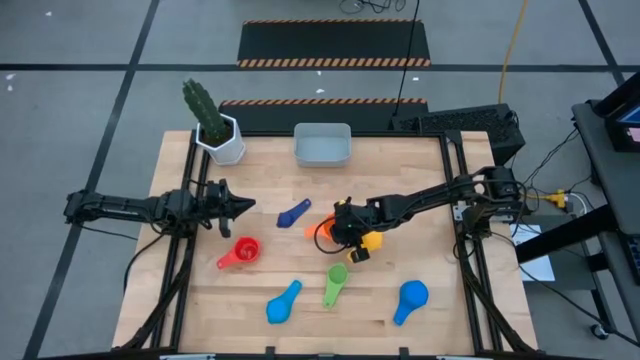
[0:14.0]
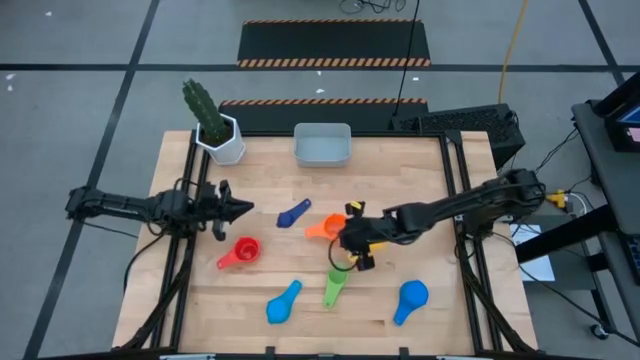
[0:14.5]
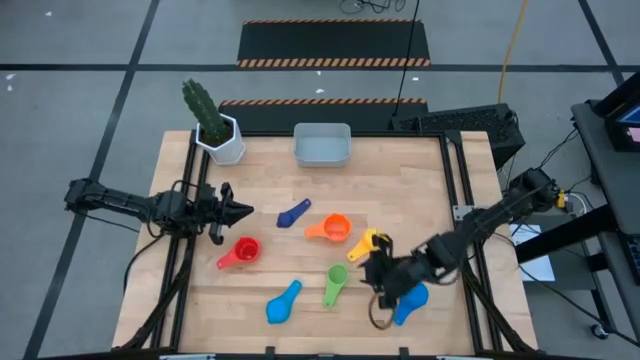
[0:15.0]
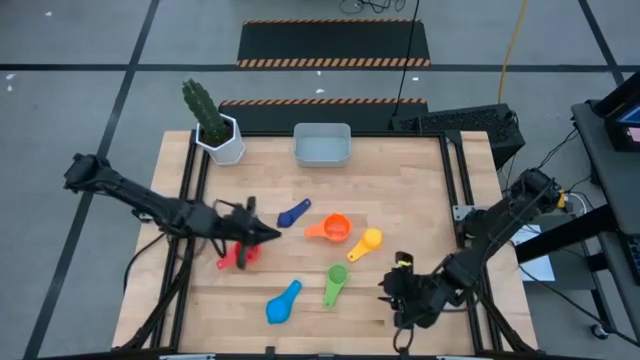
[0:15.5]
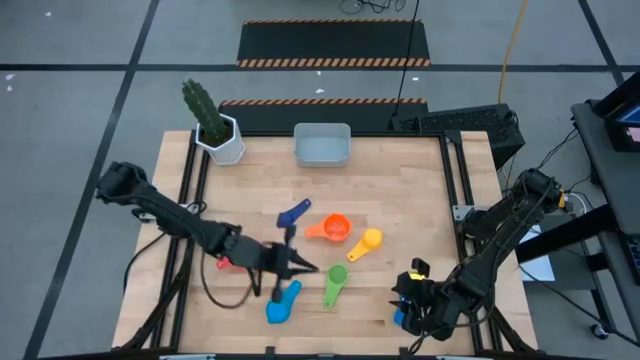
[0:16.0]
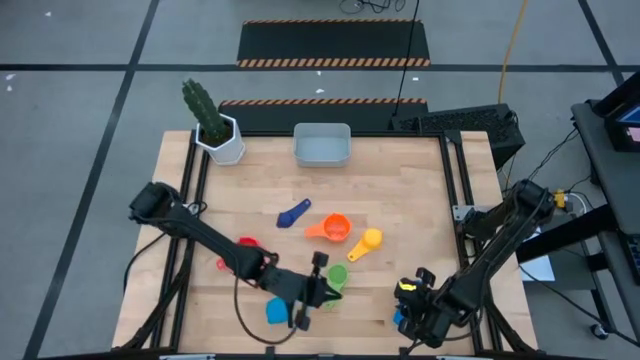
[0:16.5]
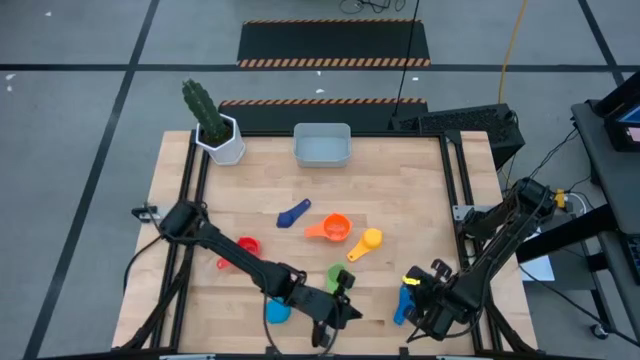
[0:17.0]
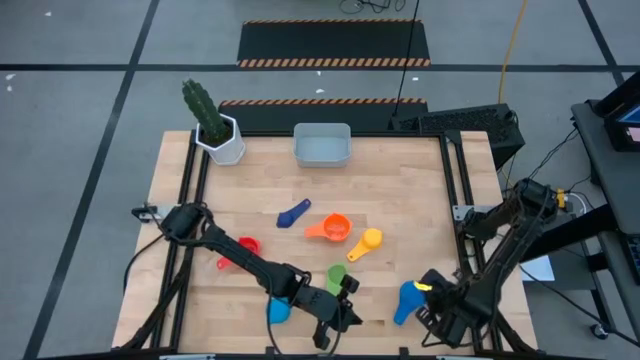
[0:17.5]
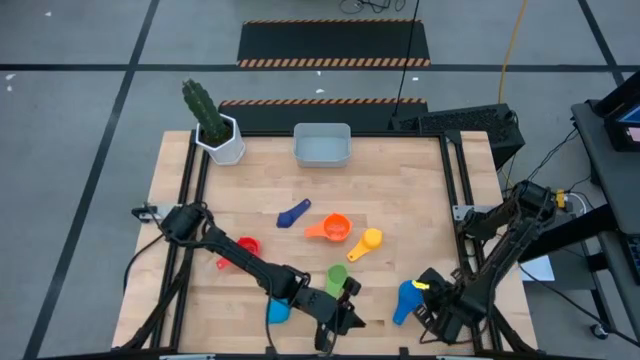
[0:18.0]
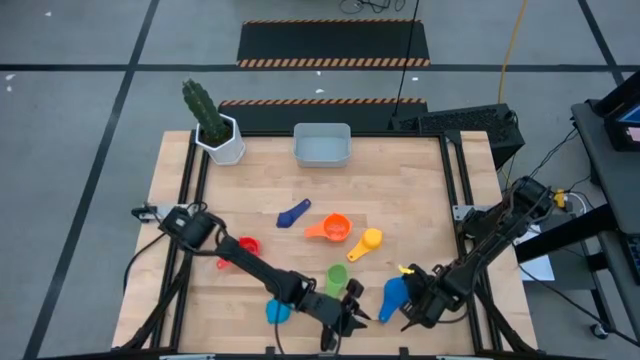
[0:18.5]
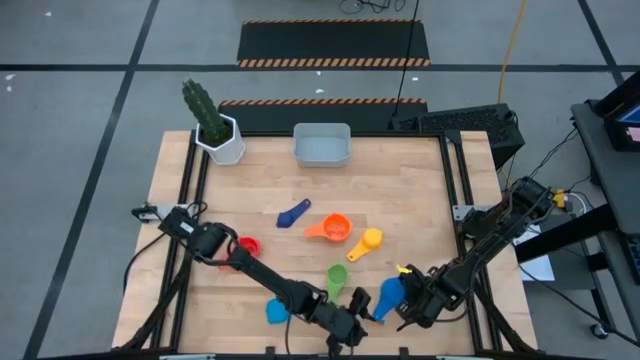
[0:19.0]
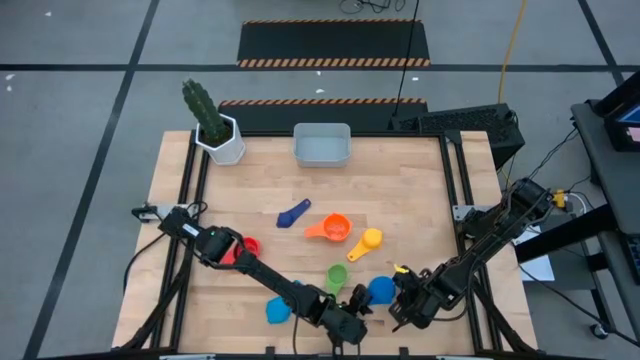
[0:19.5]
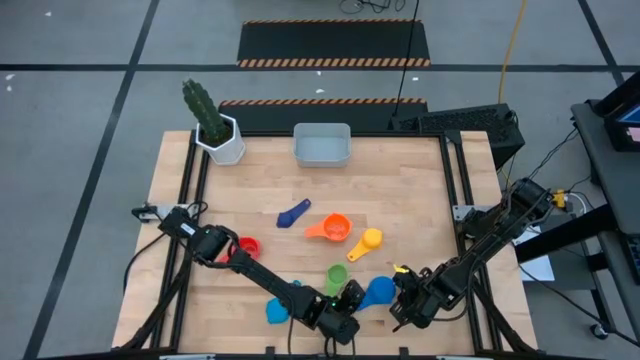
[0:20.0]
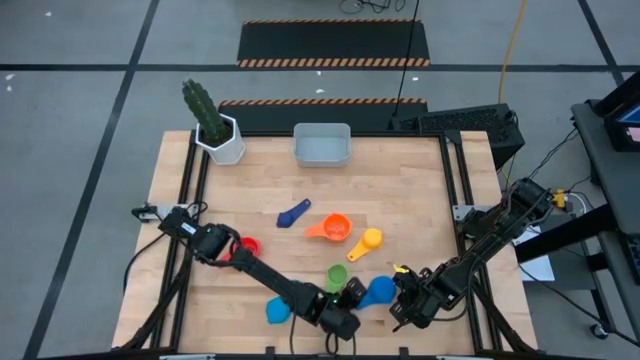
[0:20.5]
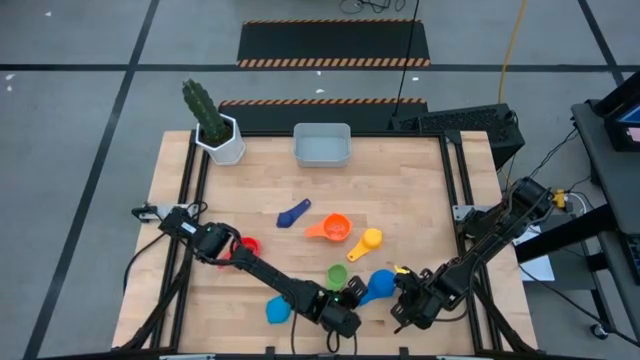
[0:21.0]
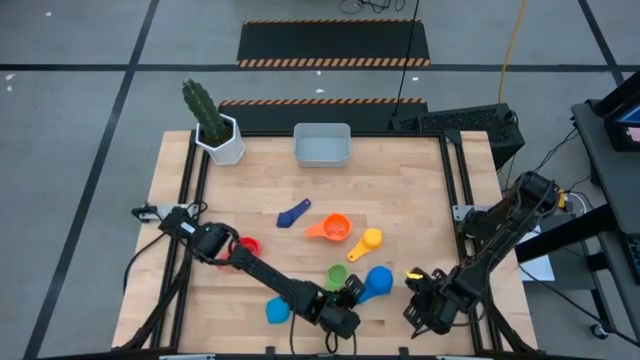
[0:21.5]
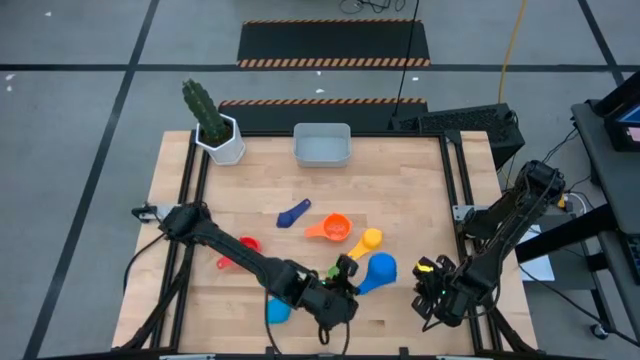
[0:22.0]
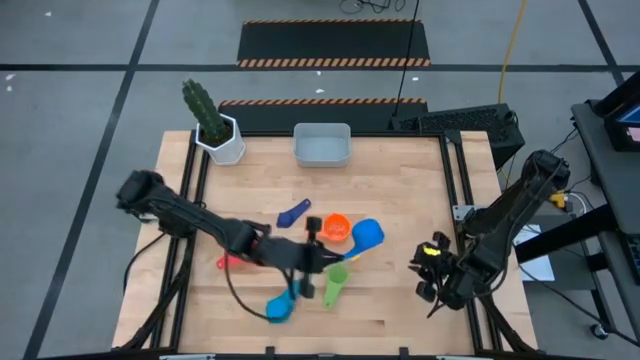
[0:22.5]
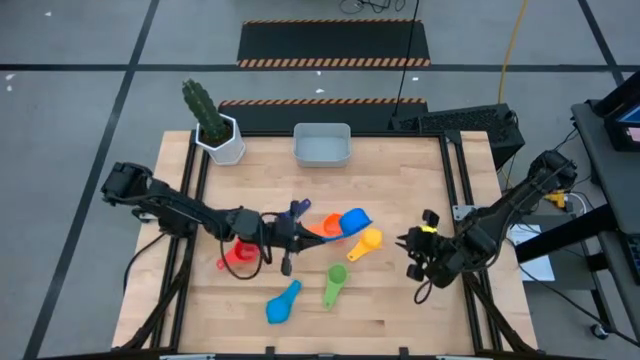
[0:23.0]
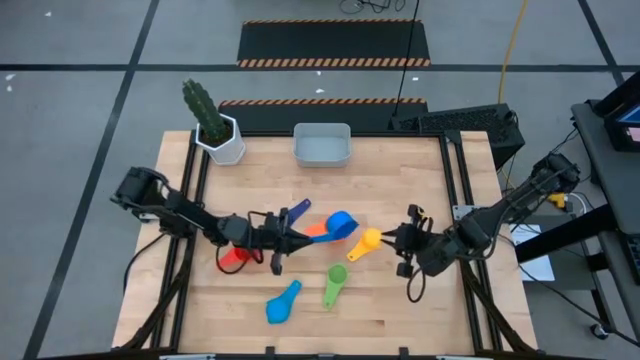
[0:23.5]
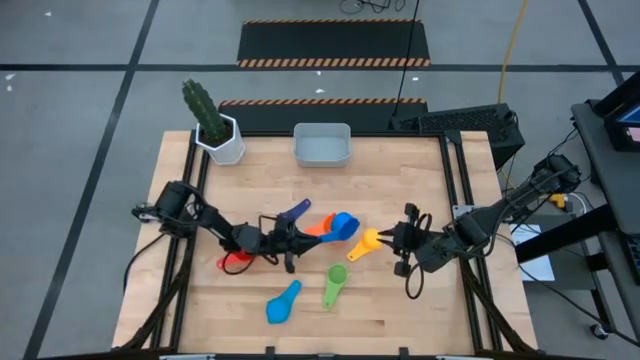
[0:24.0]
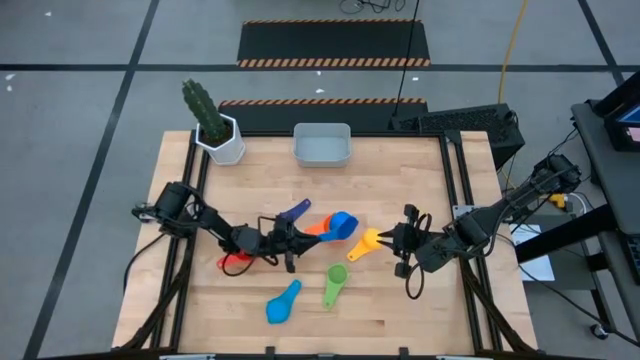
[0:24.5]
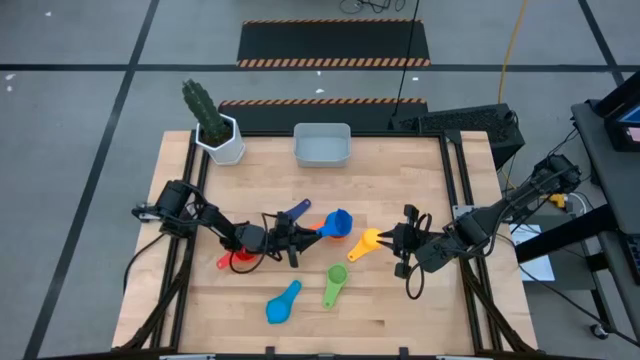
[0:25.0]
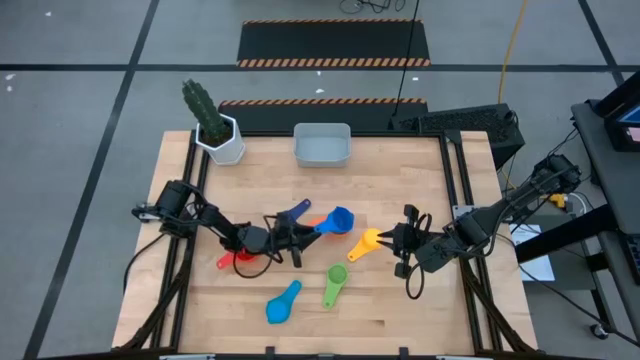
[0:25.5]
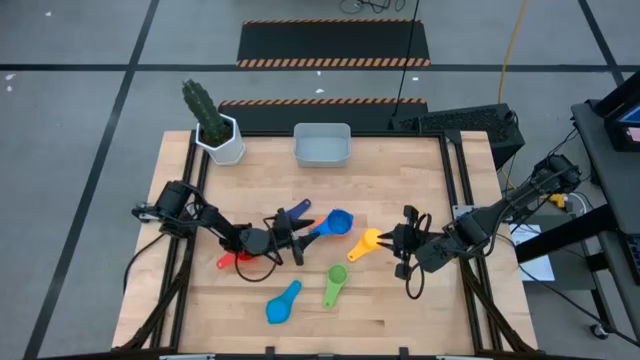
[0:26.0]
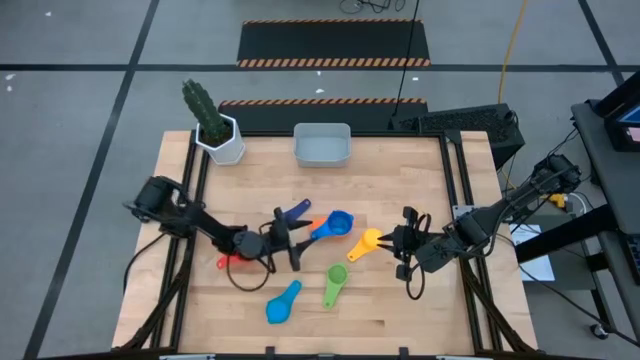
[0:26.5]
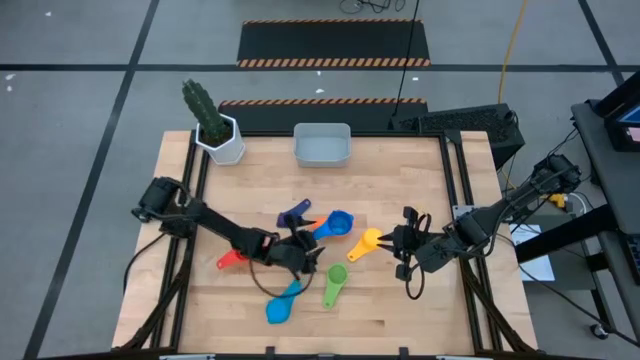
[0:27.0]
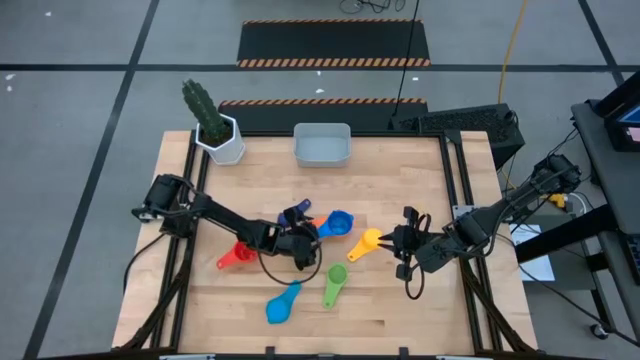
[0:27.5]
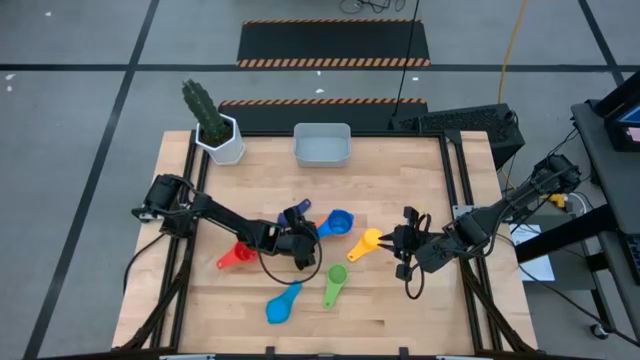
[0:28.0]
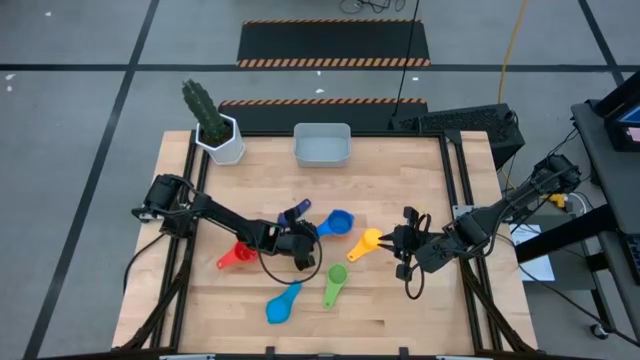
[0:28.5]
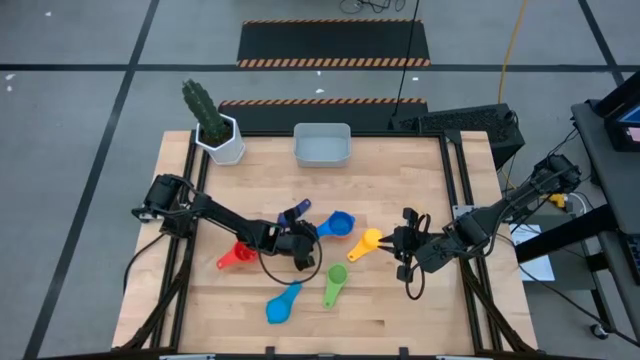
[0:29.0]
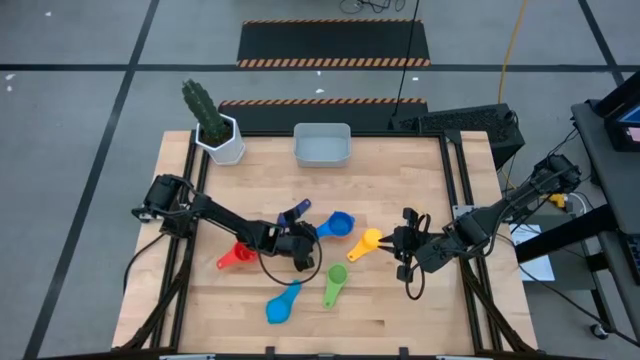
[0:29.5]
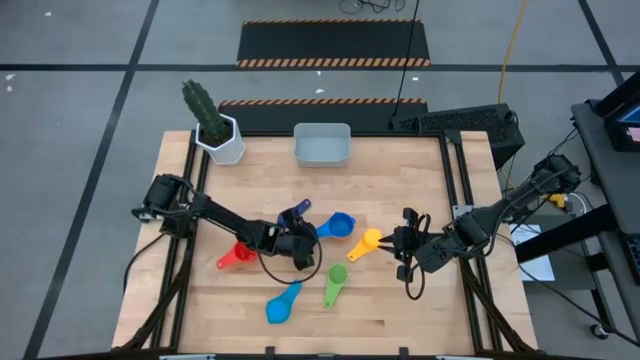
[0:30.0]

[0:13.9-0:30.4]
Task: Nest measuring cups in basket
Stack the blue measuring cup on top of the orange measuring cup

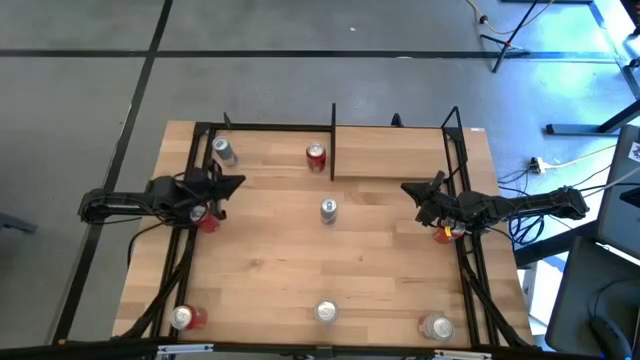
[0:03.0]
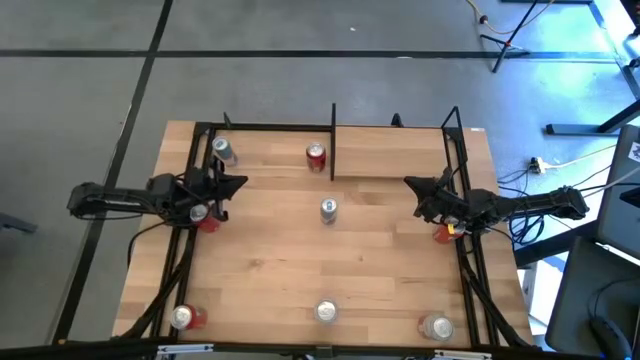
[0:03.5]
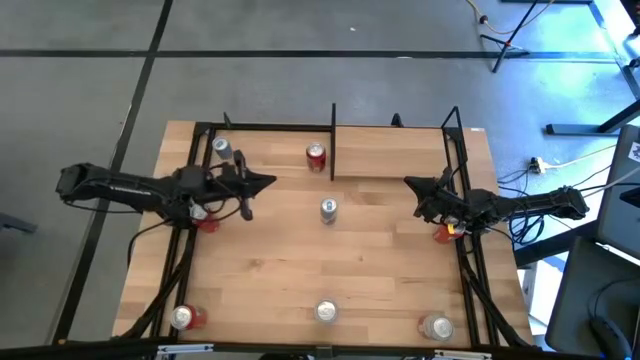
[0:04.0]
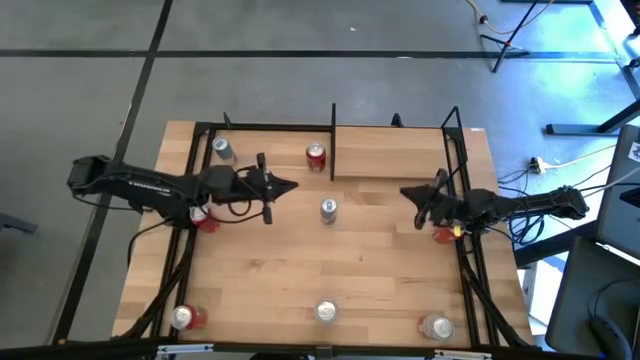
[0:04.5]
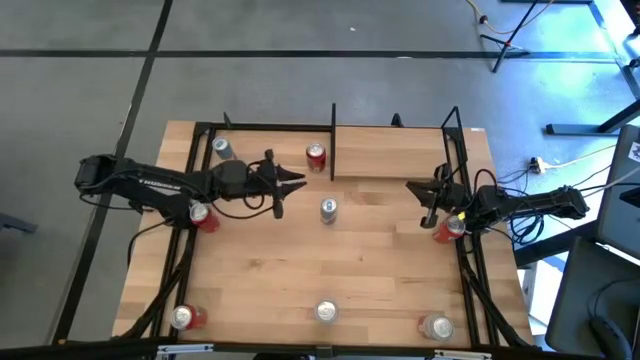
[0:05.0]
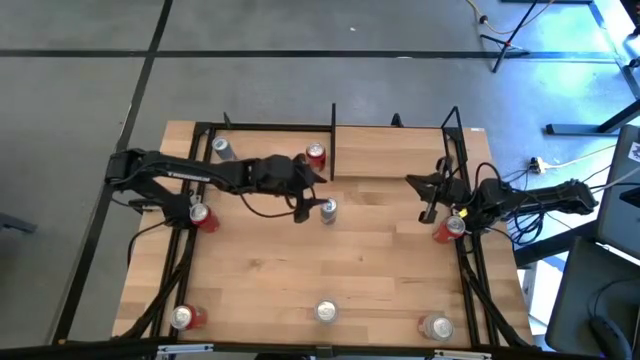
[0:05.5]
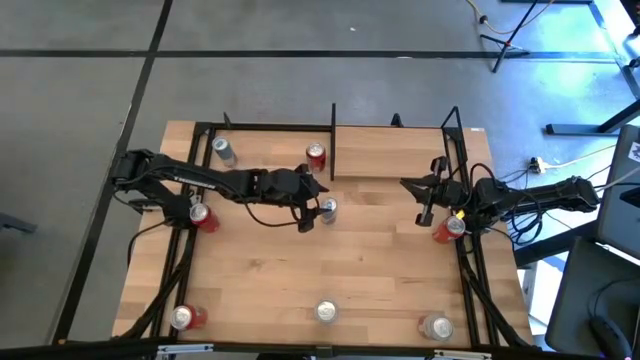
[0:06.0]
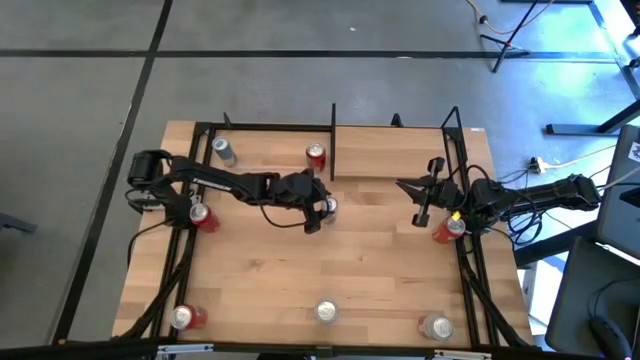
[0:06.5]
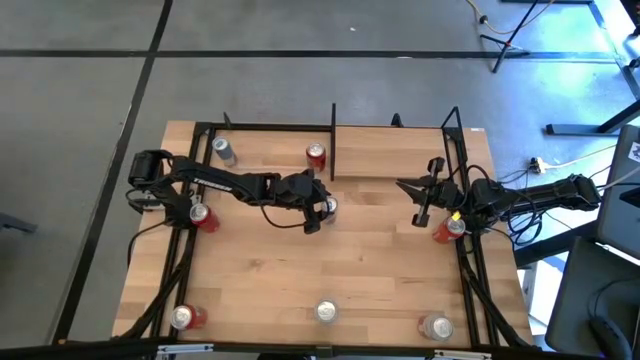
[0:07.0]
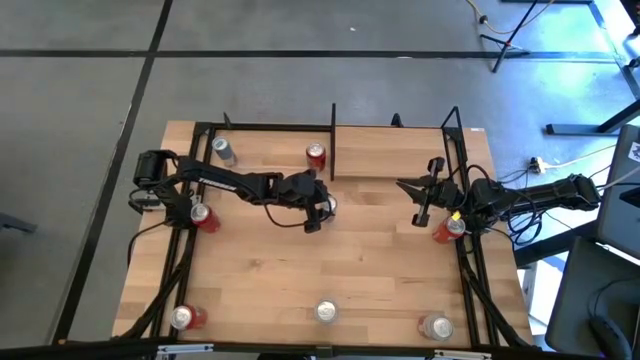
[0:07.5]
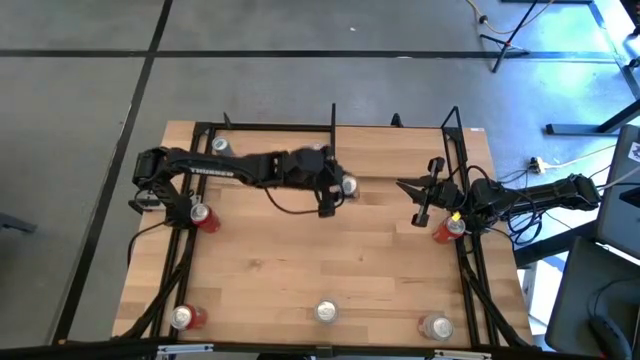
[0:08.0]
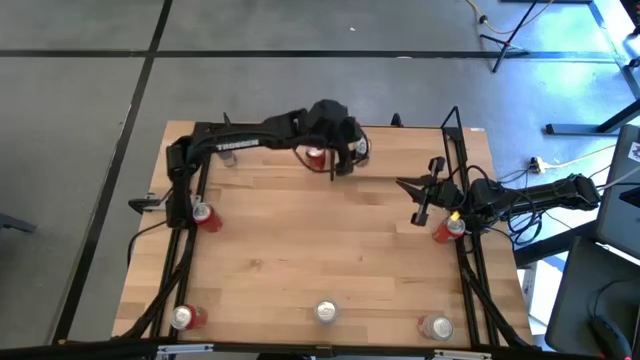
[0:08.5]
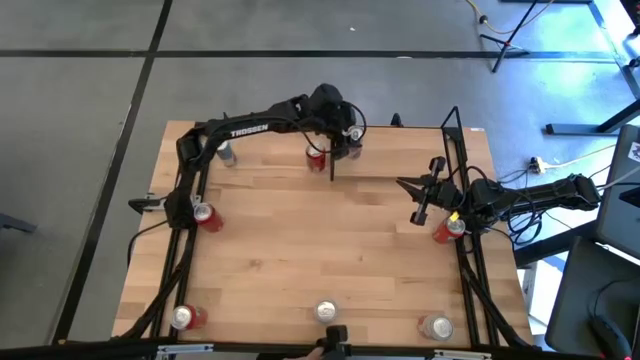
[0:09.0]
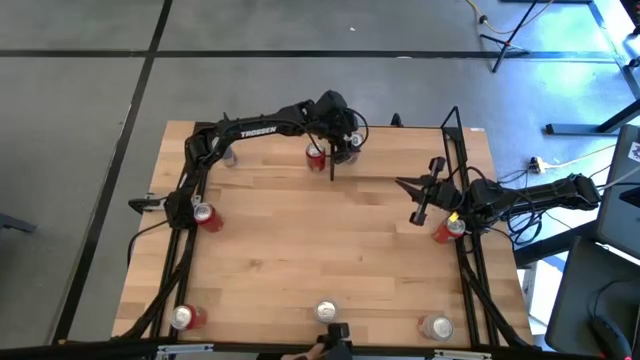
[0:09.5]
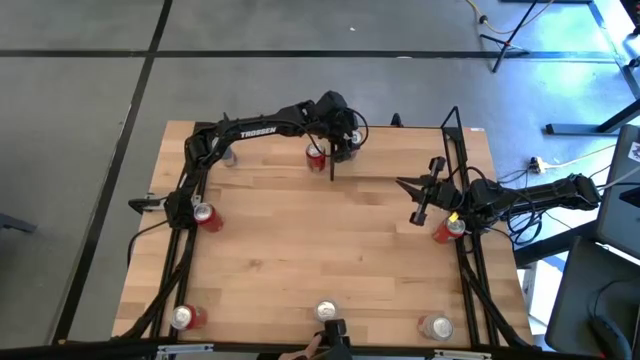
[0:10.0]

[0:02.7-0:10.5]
Task: Place canned beverage on shelf
Put the bottom blue soda can on the shelf
